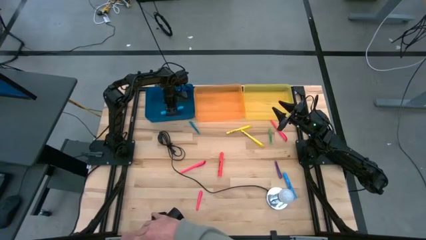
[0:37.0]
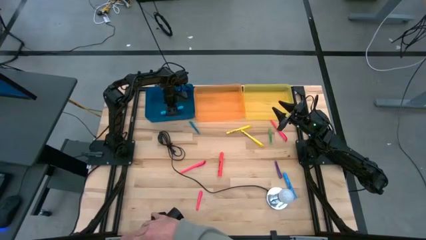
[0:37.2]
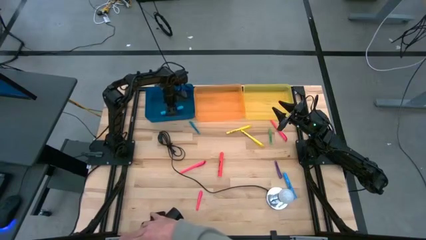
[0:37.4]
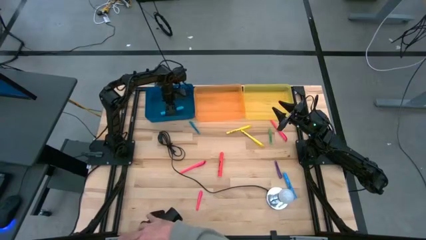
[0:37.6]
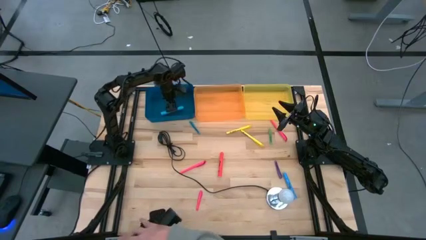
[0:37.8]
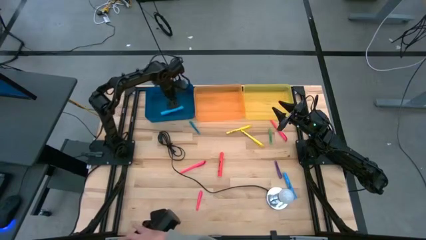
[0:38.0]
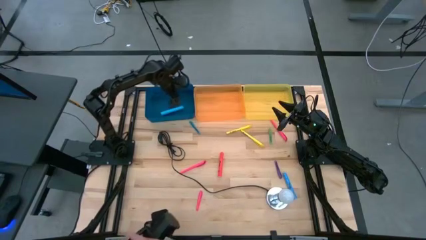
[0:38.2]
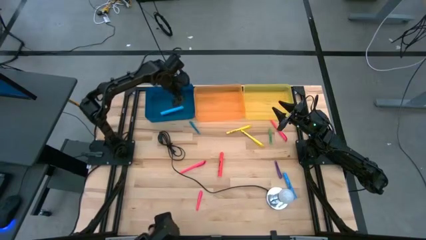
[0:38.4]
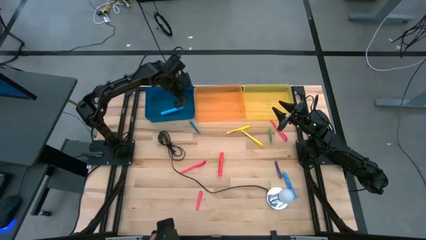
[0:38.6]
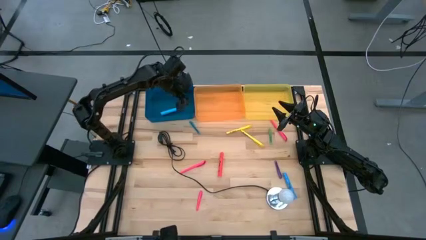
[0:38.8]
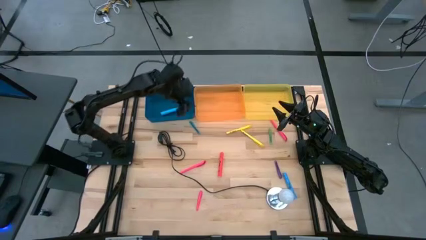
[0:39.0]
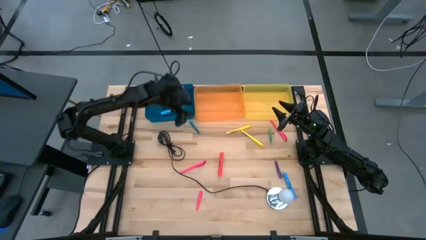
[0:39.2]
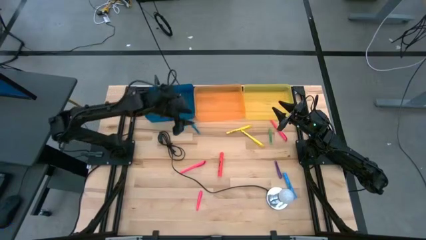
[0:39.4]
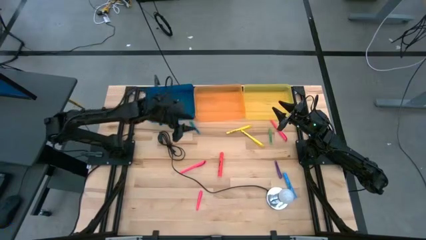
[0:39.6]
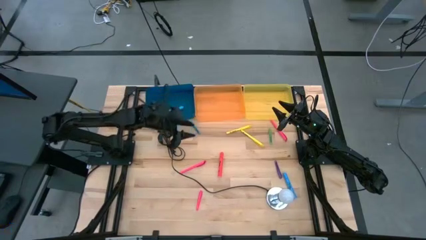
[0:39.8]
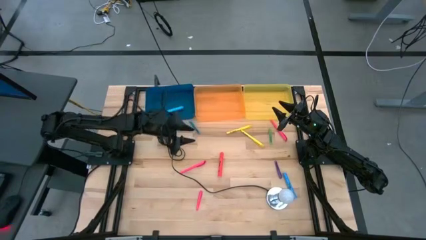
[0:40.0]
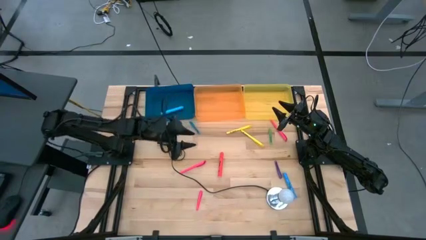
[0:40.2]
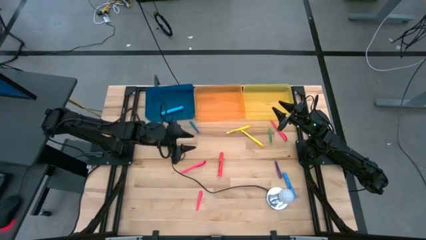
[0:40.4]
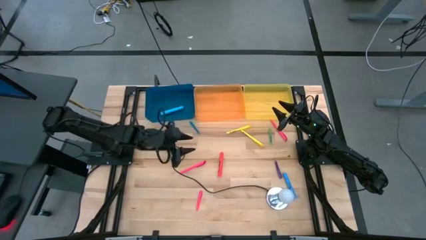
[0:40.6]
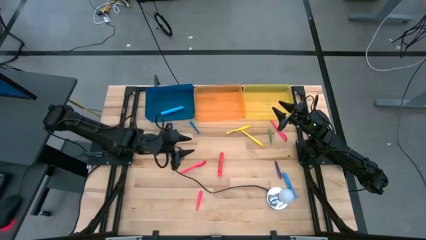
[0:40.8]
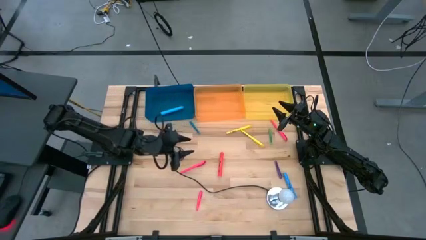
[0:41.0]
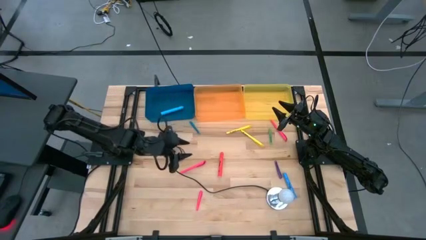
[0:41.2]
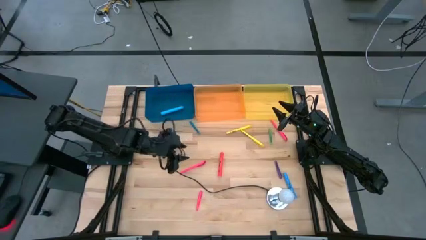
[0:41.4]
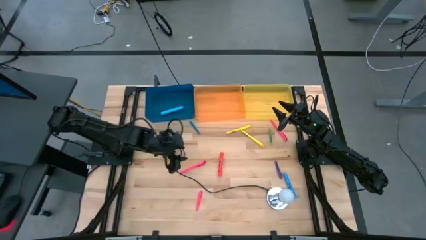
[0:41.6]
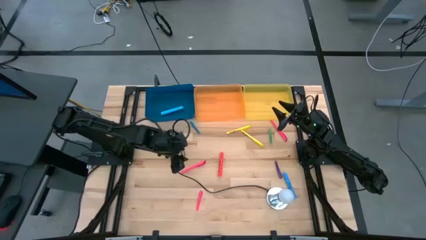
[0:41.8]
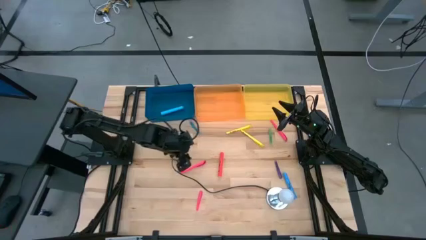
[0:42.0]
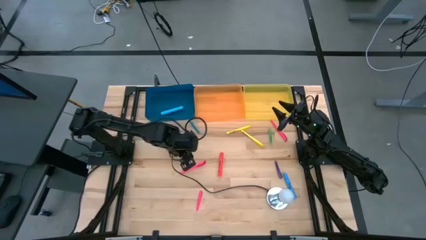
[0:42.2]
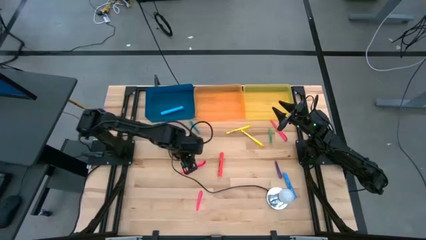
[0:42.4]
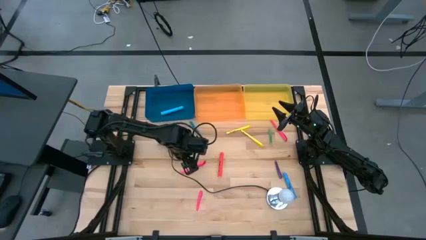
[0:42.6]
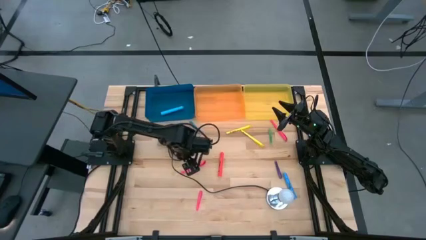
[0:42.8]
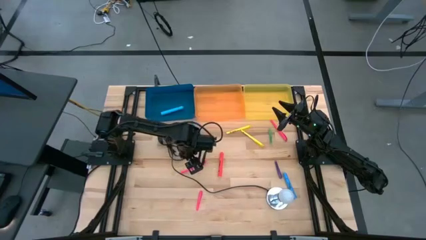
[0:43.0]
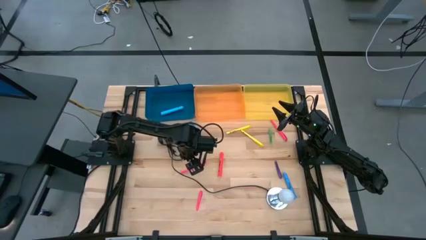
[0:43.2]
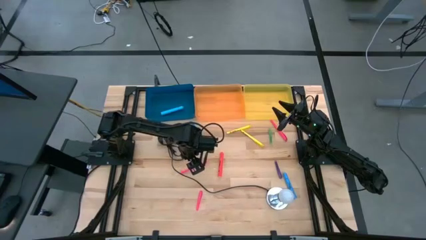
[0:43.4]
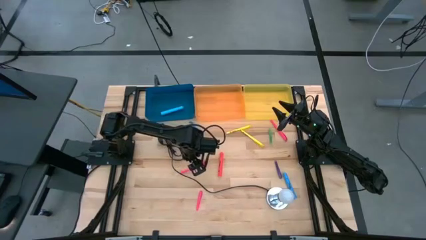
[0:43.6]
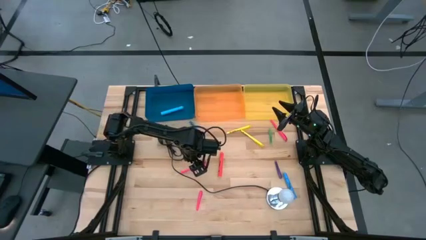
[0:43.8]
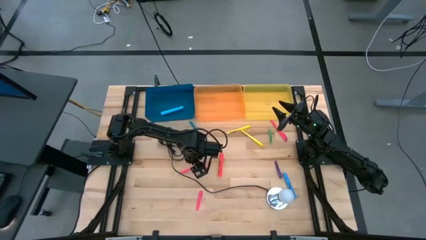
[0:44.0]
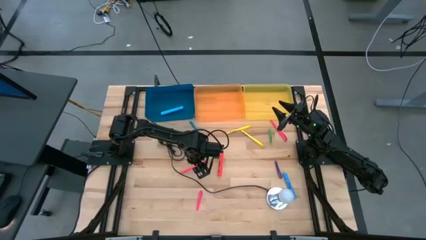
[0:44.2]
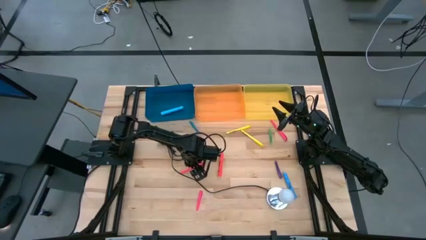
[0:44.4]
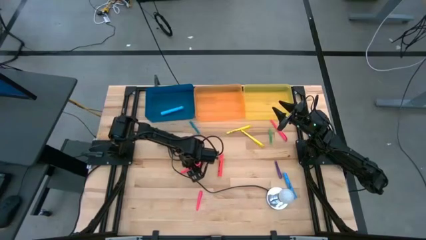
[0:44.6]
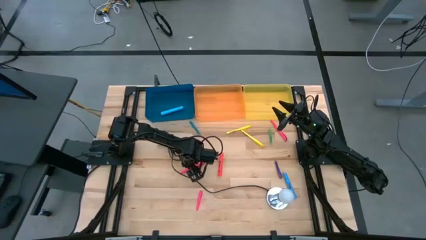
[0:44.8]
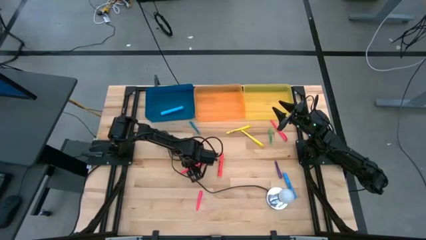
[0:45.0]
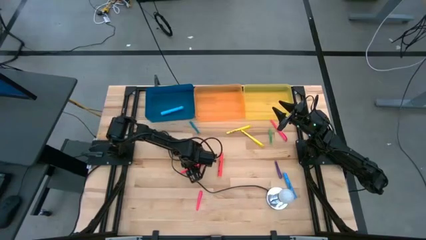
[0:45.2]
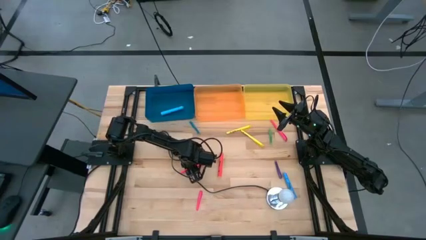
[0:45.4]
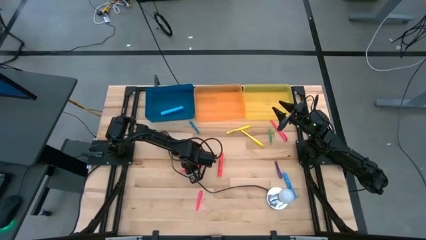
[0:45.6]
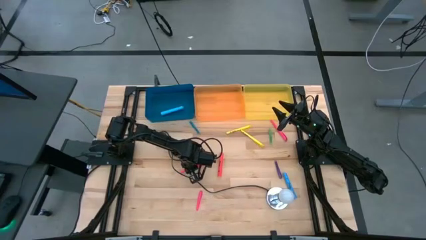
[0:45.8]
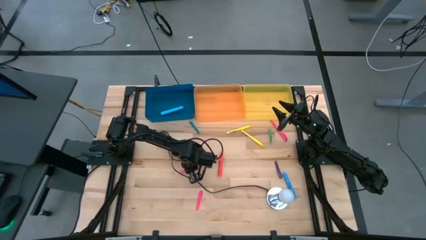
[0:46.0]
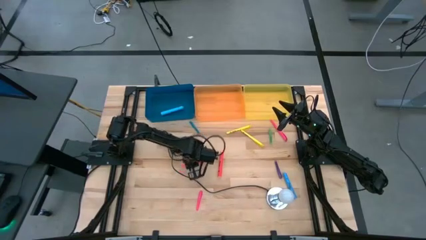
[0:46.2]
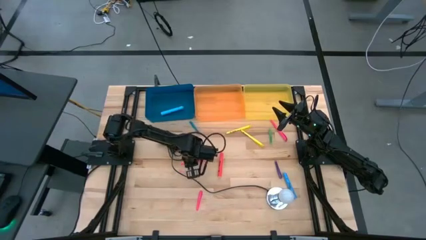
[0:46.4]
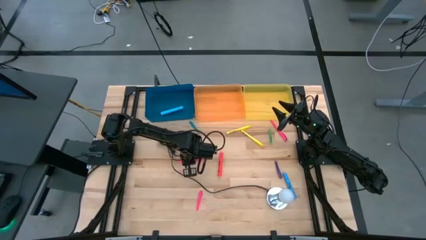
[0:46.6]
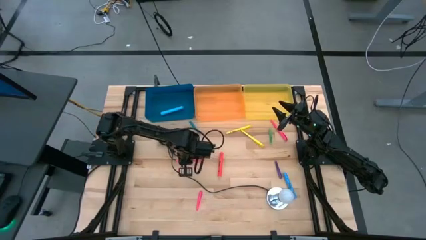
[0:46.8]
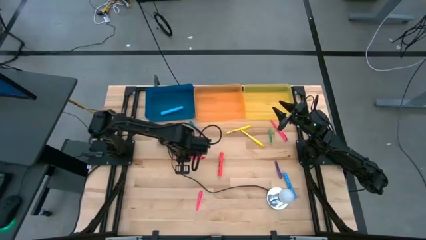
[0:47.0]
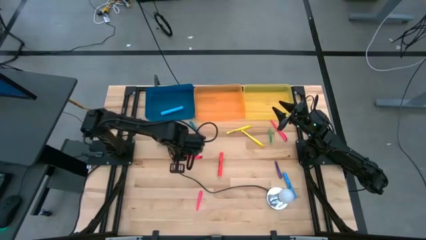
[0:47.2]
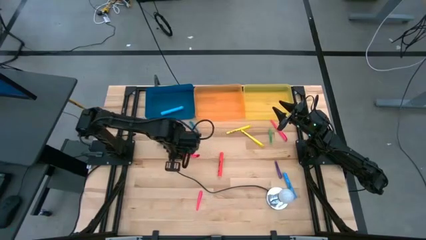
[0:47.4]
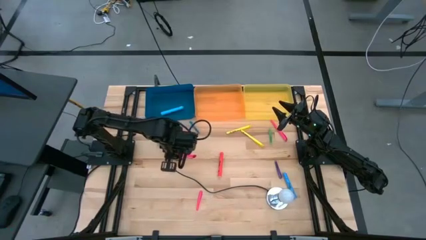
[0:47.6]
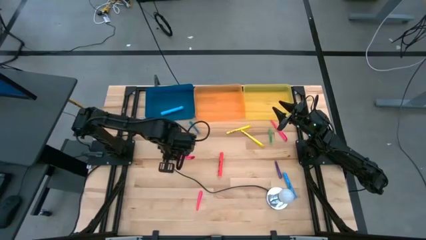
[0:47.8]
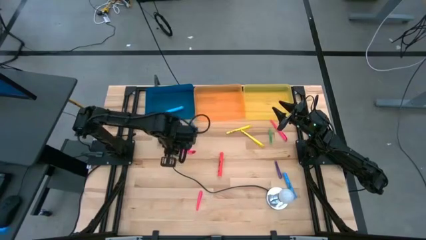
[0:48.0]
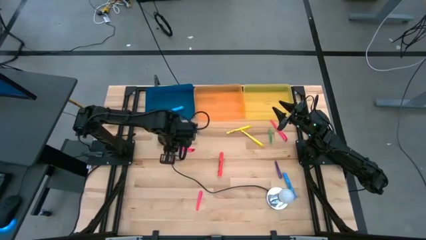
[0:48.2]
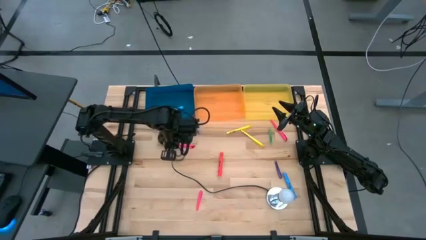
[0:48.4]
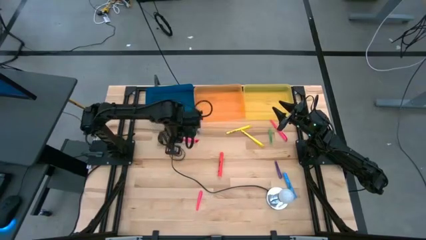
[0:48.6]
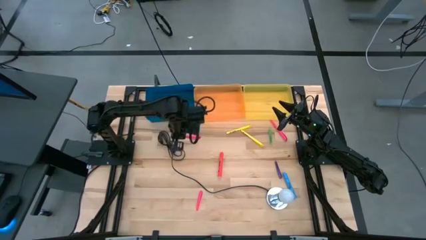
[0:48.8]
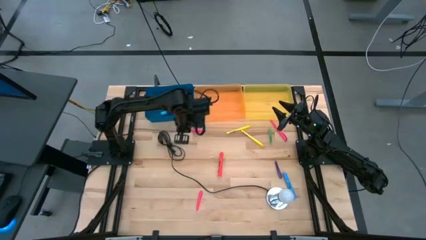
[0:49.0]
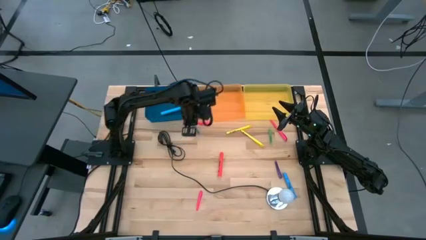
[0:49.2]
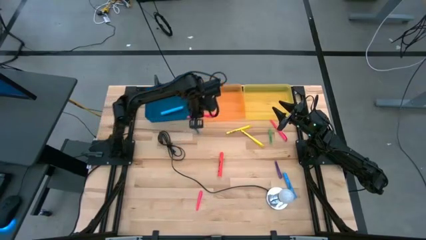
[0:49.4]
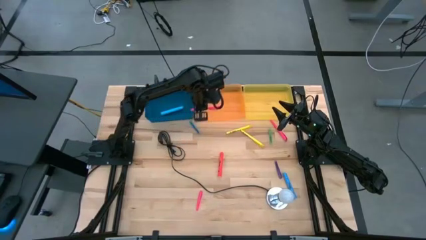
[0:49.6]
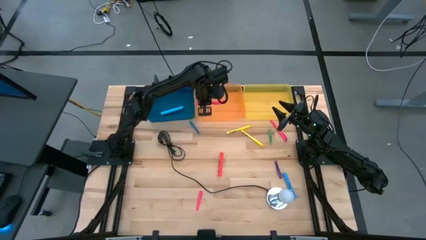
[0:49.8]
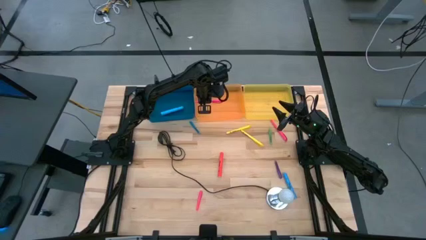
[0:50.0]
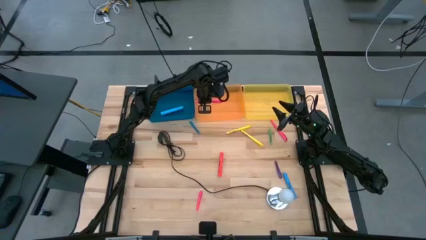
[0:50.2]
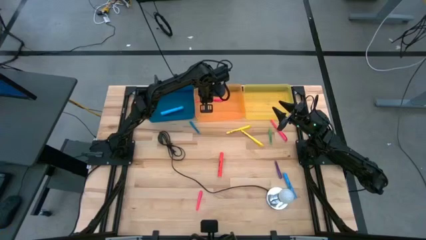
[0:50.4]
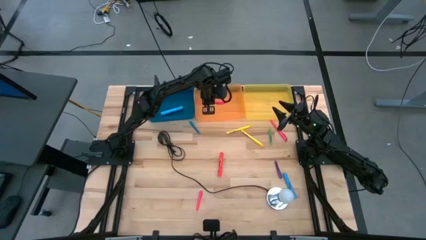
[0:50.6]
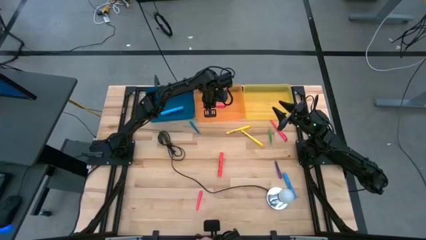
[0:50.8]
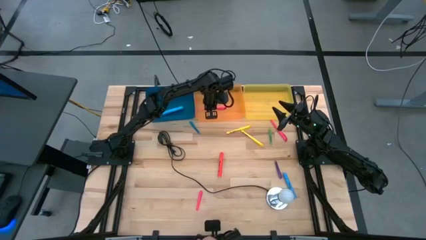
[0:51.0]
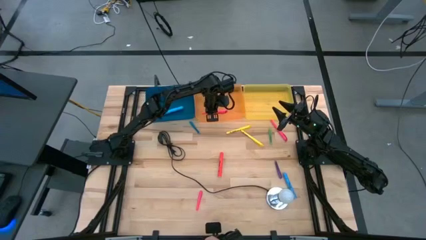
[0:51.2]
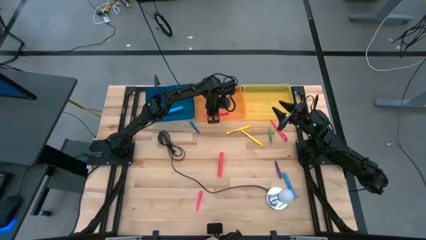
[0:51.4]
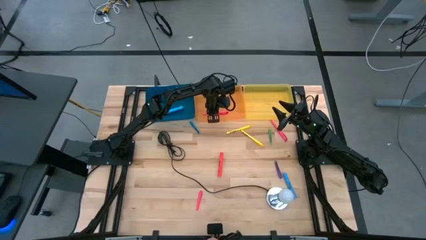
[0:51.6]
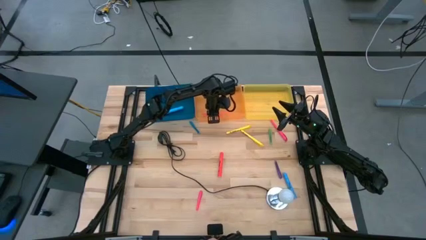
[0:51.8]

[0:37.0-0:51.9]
Task: Pick & Place Markers
Put the left large pink pen into the orange bin

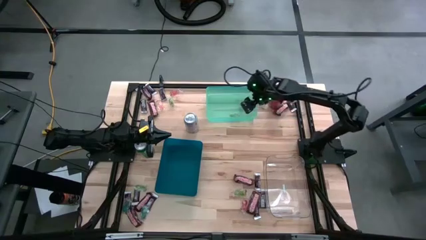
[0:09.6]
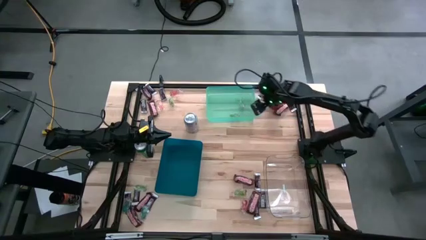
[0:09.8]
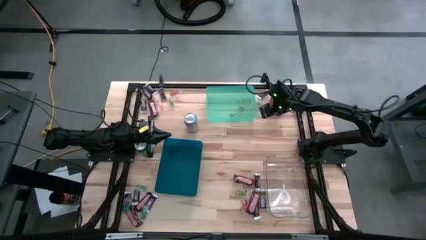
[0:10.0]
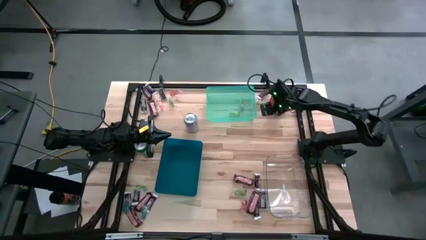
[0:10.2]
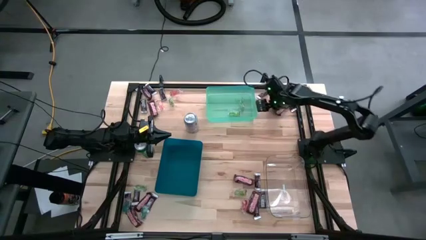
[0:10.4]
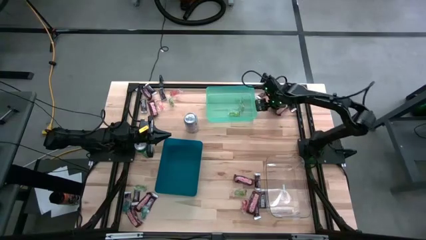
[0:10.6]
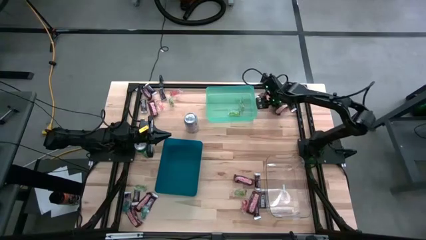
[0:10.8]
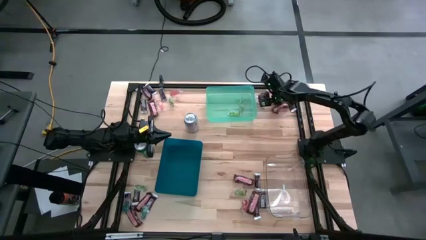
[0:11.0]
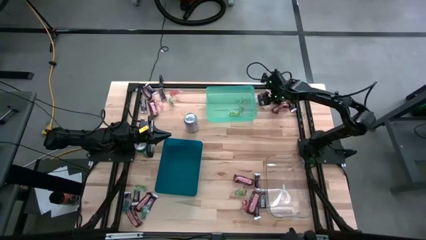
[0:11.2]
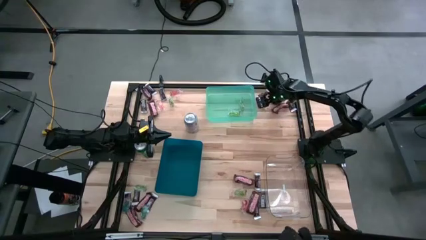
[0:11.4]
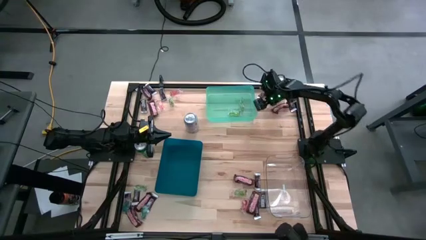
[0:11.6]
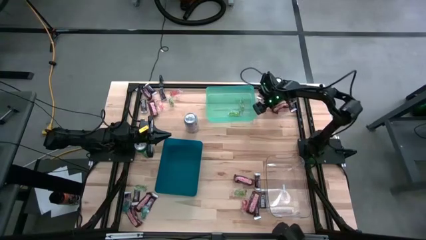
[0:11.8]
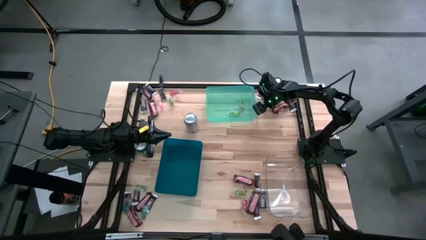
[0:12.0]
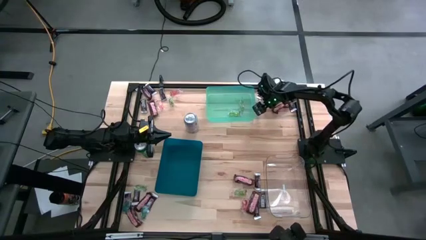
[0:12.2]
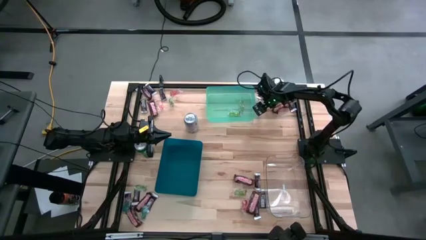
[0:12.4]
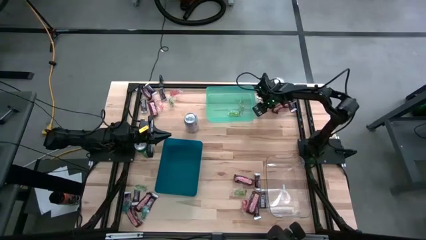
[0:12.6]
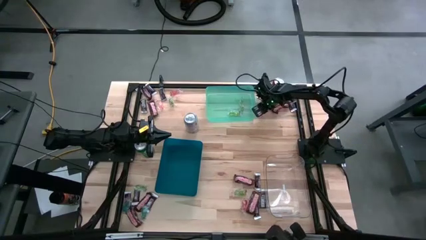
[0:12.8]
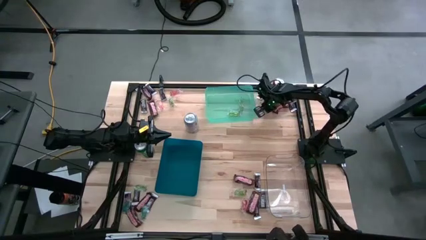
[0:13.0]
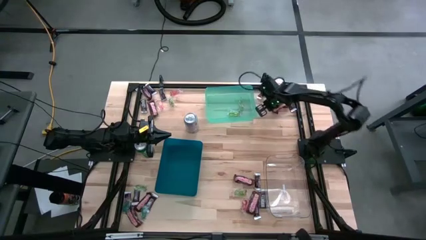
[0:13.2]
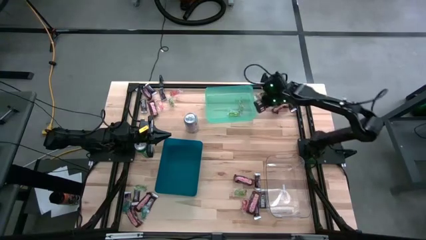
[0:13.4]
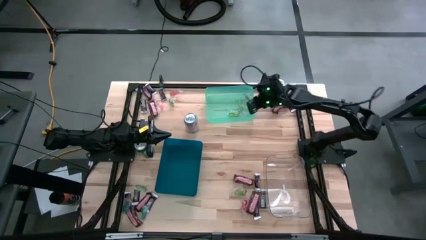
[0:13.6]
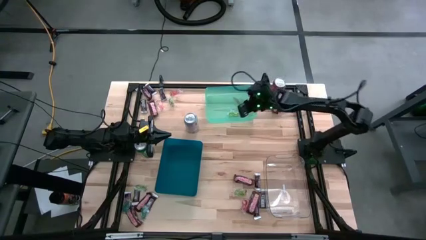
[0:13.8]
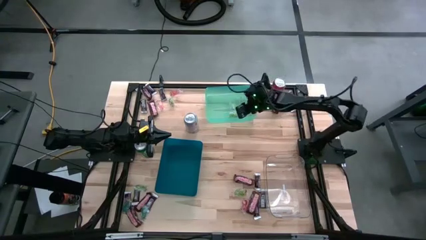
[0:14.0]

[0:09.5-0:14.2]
Task: Organize candy in baskets
Put the transparent gummy into the green bin
